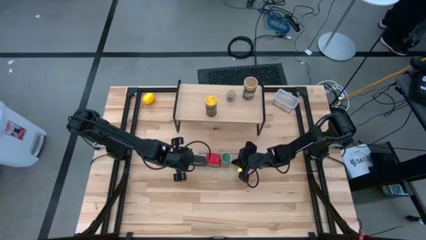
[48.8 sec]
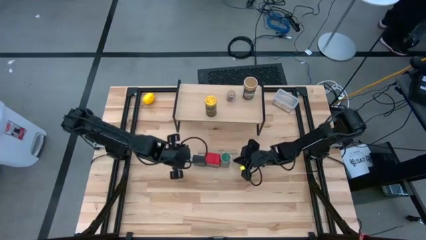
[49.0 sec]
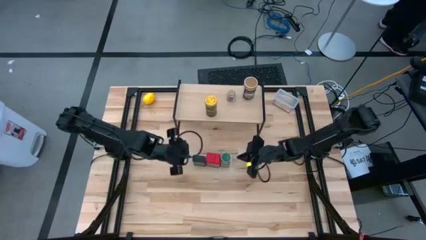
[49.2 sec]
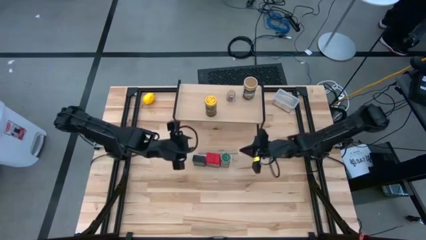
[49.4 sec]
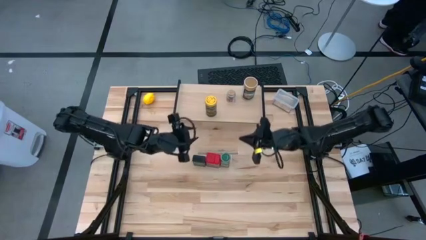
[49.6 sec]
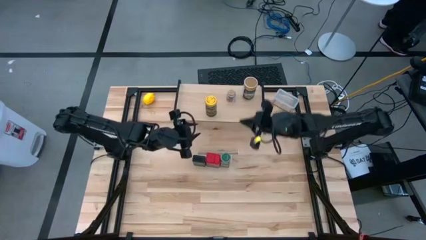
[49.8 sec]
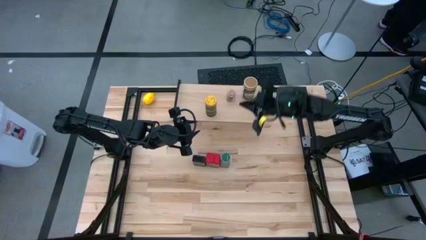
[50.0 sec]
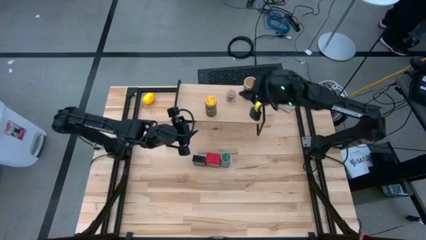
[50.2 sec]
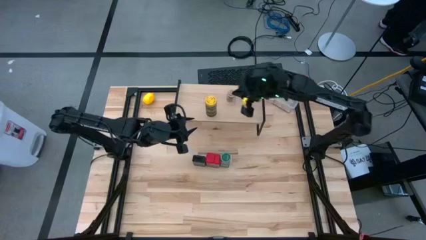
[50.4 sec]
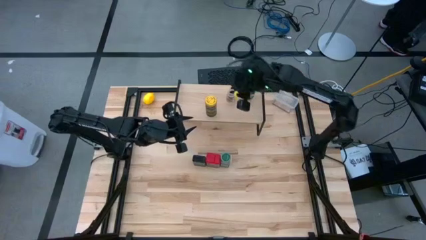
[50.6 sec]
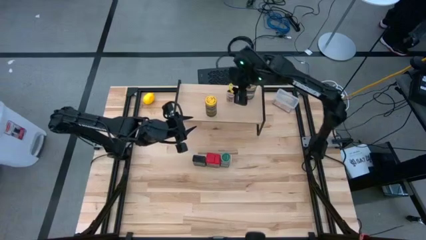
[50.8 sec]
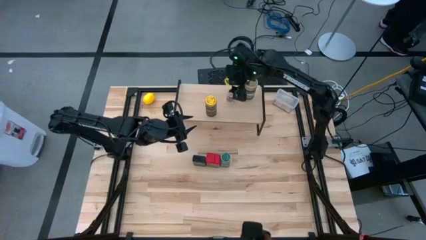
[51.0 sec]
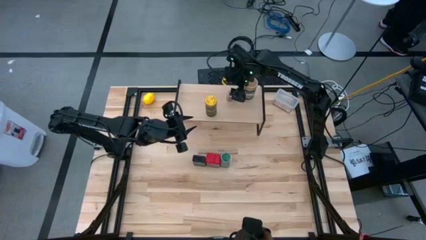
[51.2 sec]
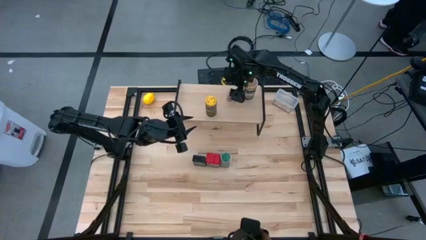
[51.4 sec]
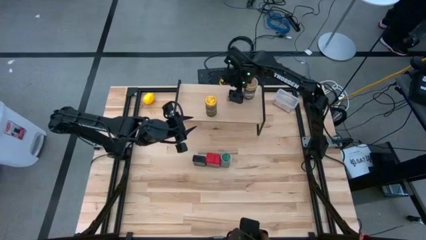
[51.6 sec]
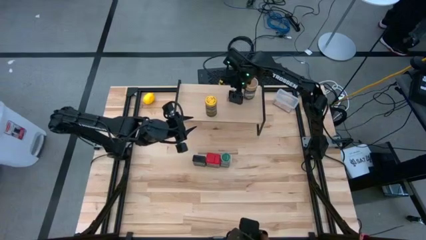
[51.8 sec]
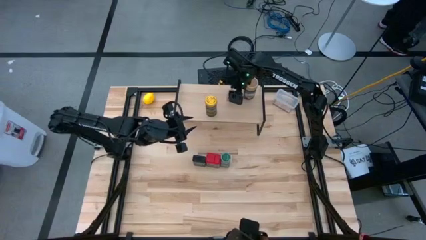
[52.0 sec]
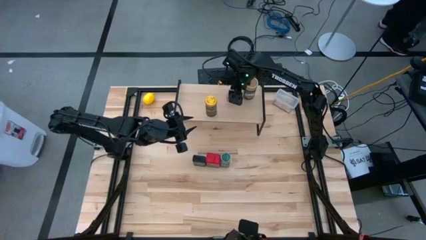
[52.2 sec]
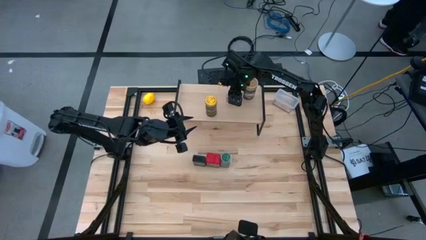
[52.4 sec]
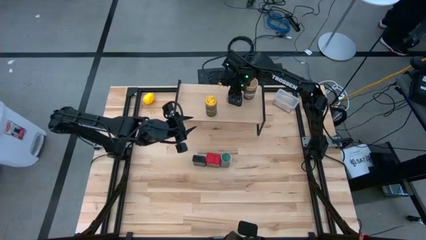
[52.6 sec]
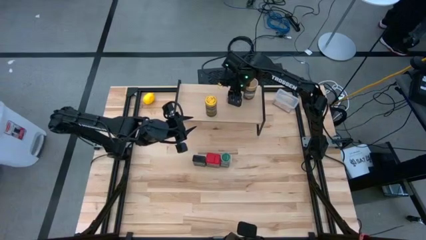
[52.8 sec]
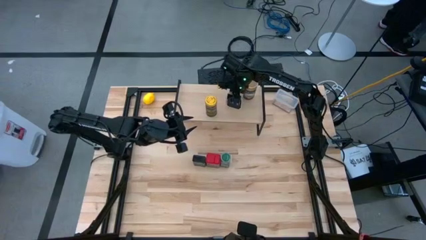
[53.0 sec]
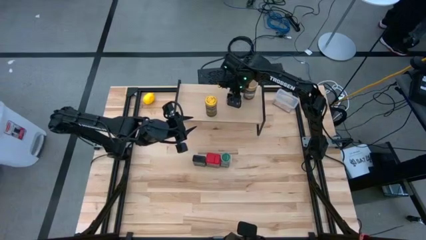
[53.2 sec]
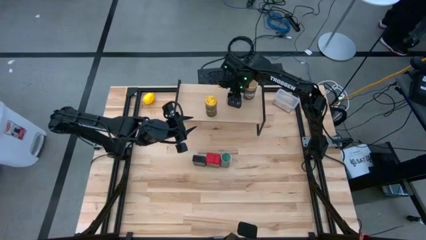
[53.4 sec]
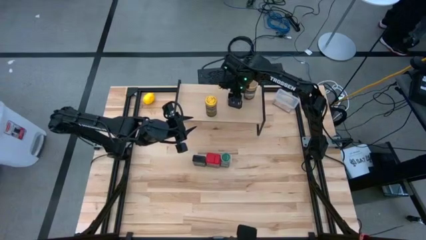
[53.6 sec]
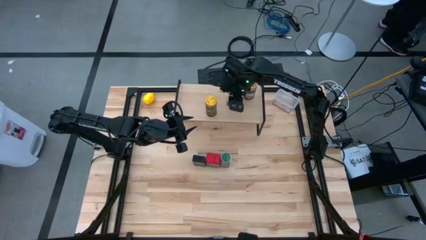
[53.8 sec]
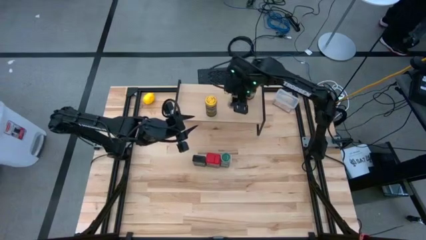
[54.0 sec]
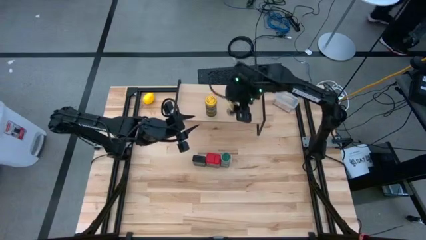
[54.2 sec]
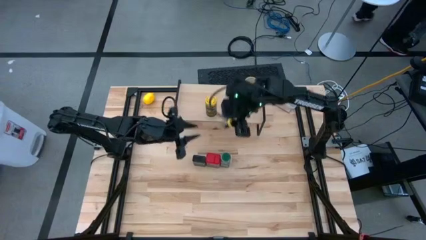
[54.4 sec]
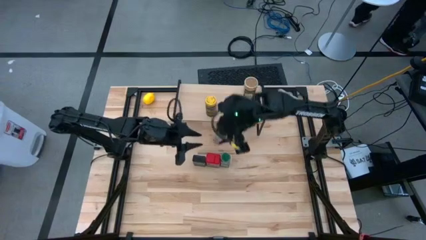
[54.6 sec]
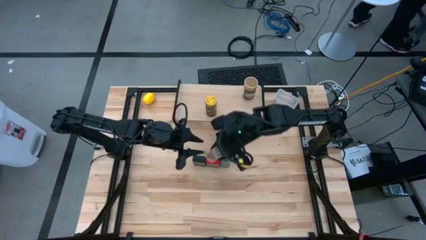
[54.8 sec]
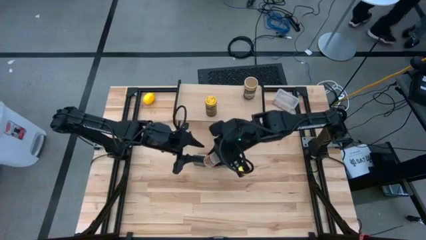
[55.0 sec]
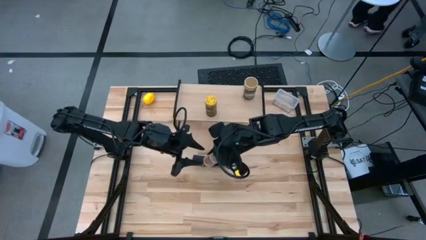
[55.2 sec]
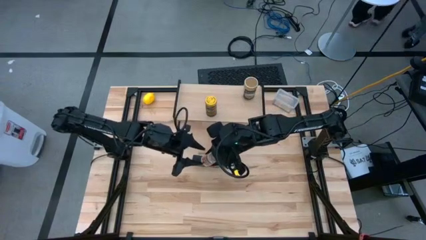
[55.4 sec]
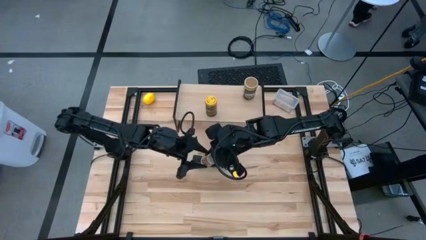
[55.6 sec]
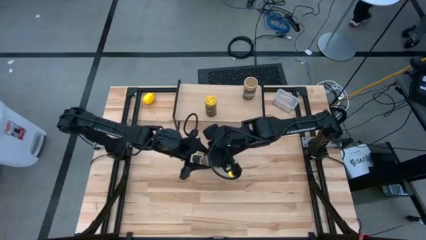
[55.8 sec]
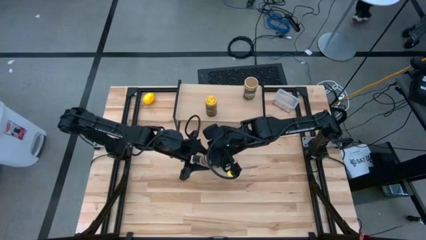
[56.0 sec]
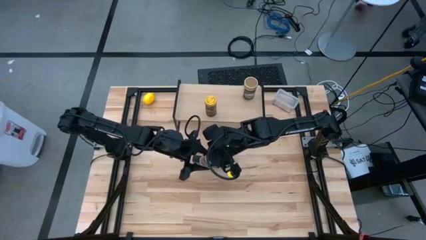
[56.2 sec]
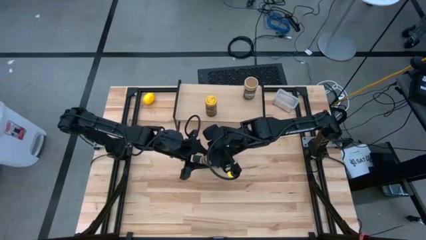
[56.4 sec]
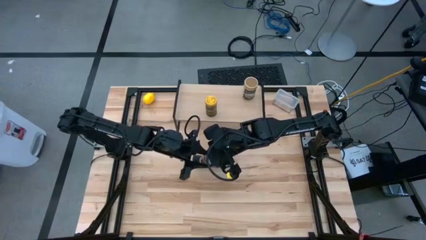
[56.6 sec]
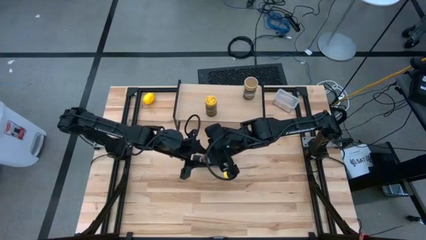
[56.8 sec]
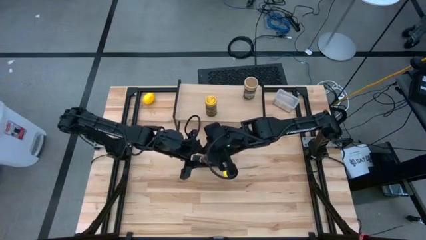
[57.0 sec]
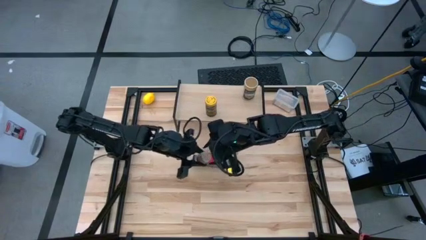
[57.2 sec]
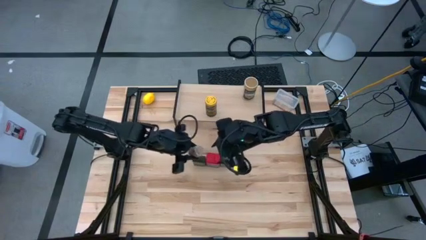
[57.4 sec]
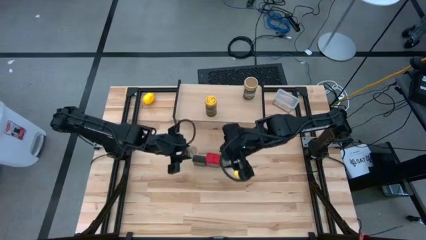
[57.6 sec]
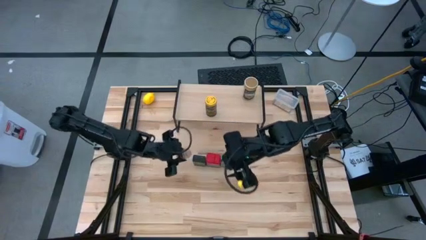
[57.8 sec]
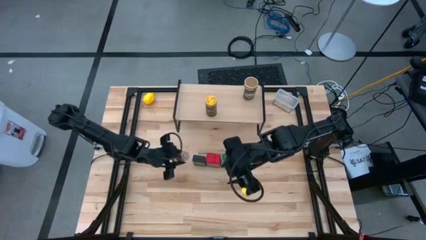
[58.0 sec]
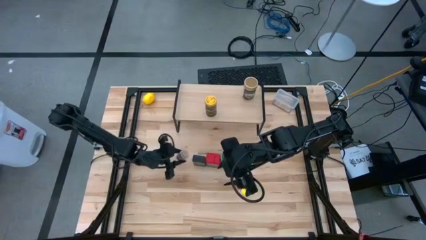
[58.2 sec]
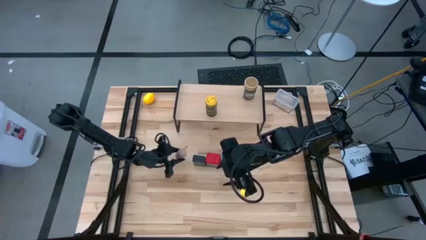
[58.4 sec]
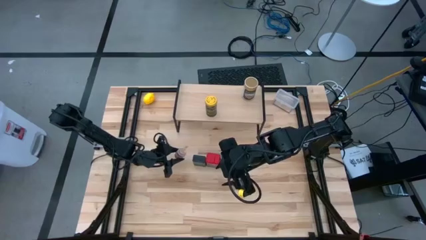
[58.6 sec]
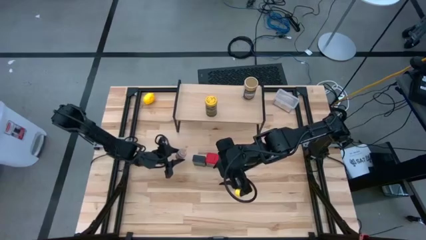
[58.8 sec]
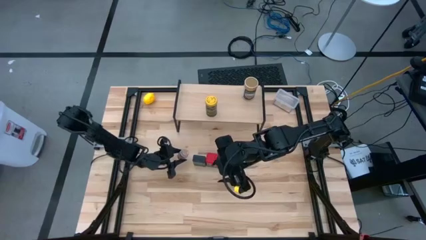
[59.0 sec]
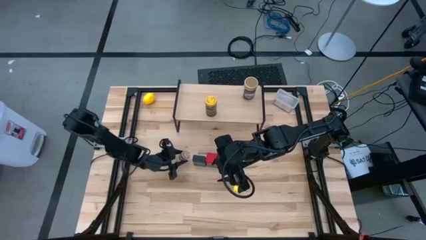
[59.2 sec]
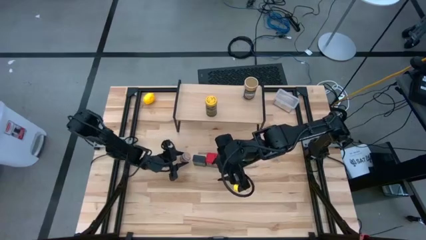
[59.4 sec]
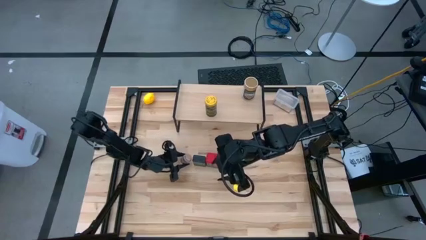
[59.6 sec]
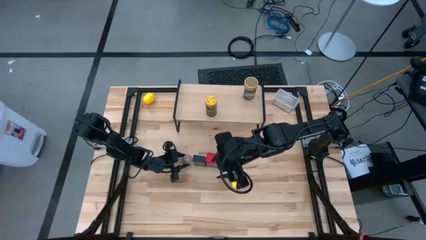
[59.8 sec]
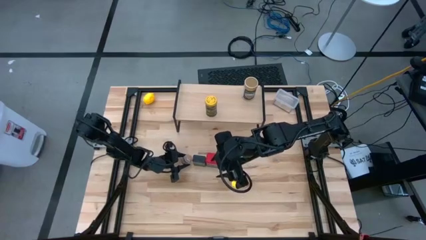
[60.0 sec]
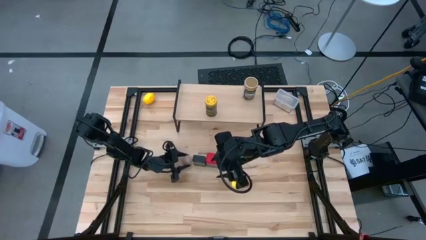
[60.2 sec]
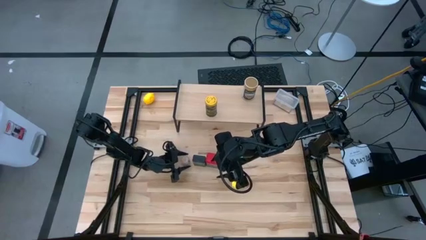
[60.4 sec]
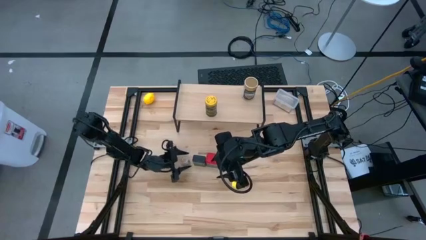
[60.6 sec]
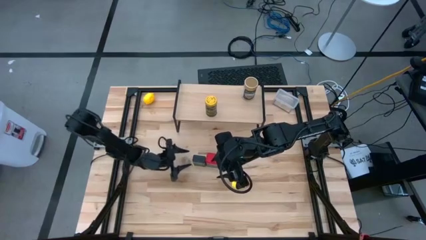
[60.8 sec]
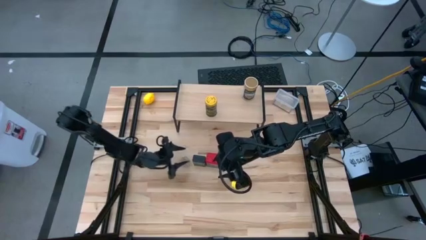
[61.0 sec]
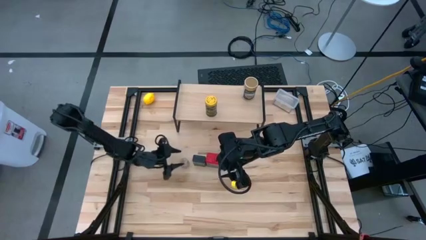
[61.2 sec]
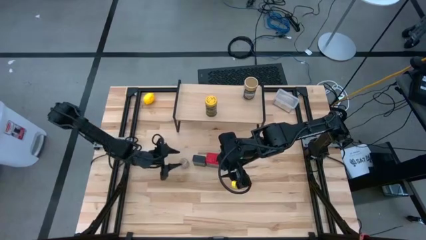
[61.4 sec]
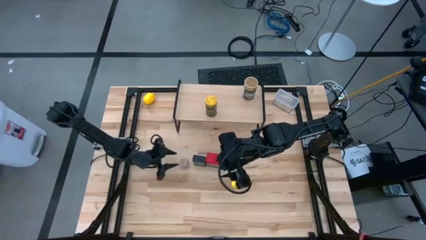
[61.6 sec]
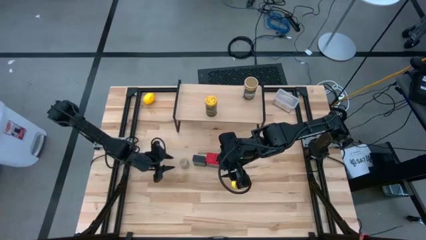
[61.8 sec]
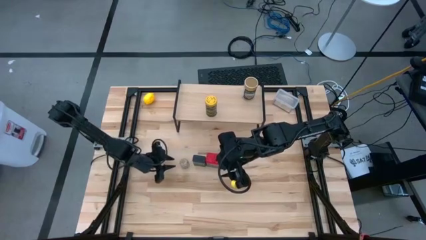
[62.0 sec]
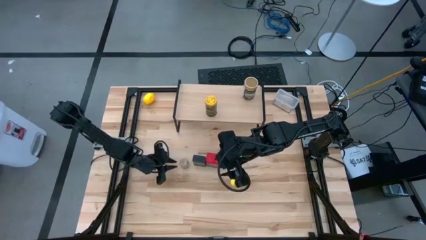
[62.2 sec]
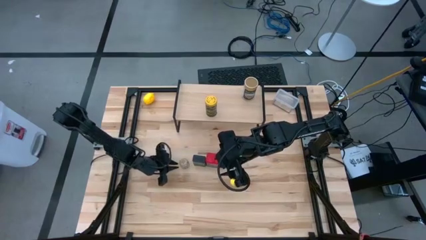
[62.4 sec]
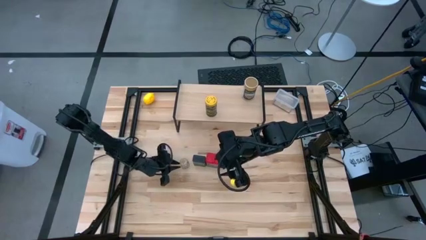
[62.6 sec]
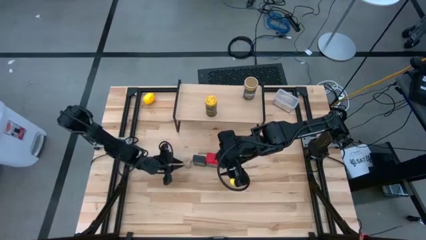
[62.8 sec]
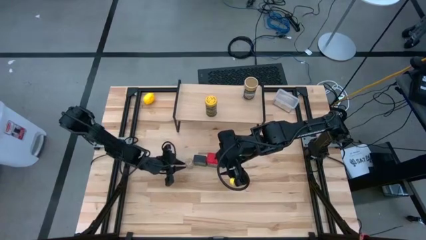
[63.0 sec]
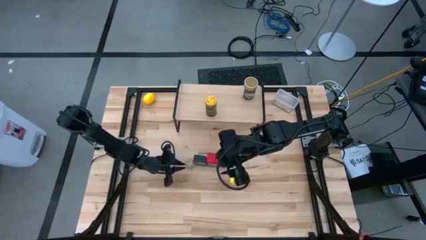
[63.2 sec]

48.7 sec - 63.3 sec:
Task: Shelf spices
Remove the transparent seasoning bottle from the shelf
